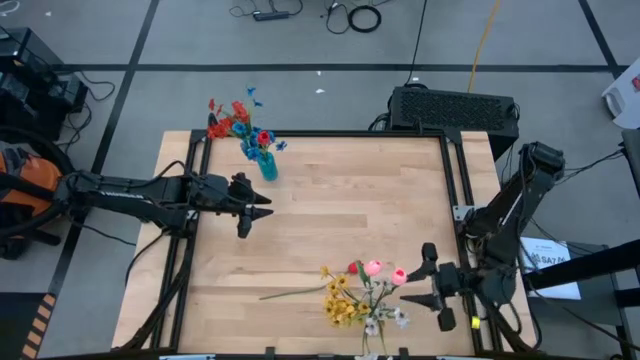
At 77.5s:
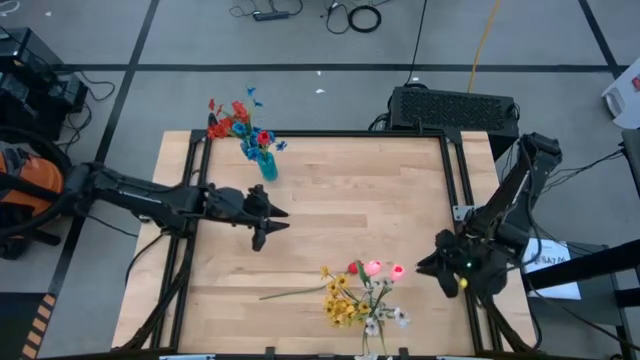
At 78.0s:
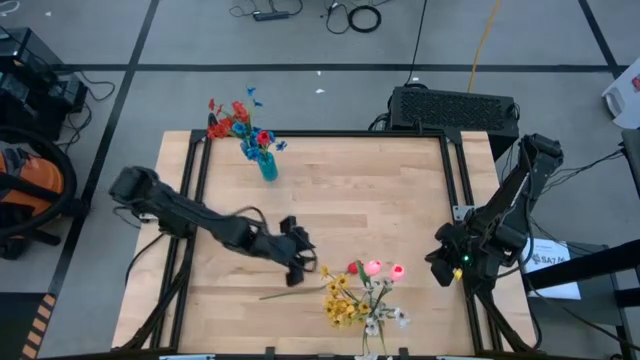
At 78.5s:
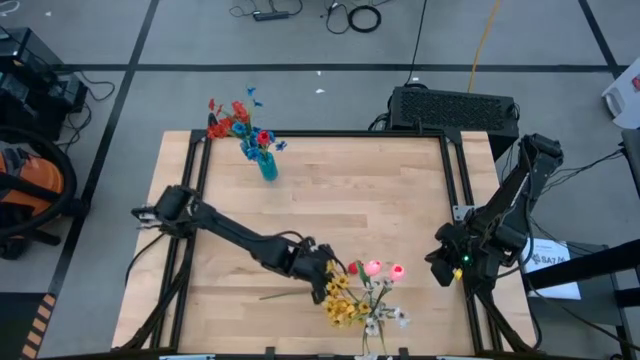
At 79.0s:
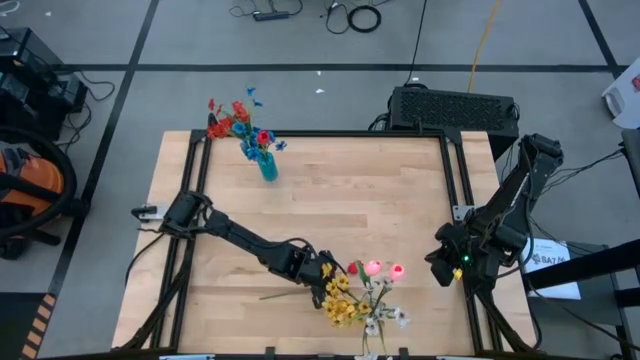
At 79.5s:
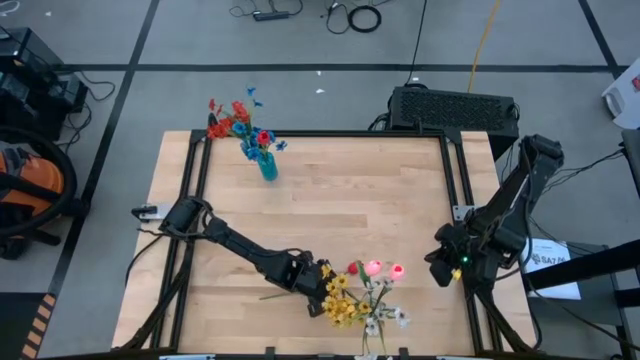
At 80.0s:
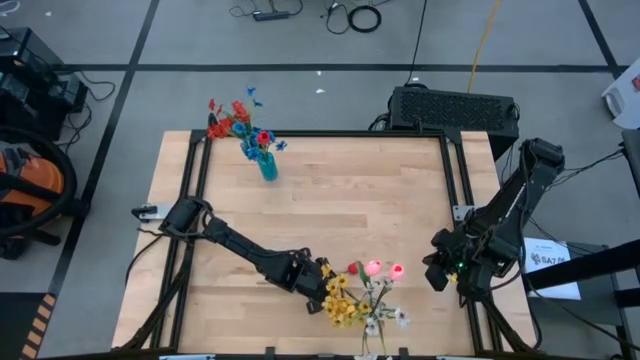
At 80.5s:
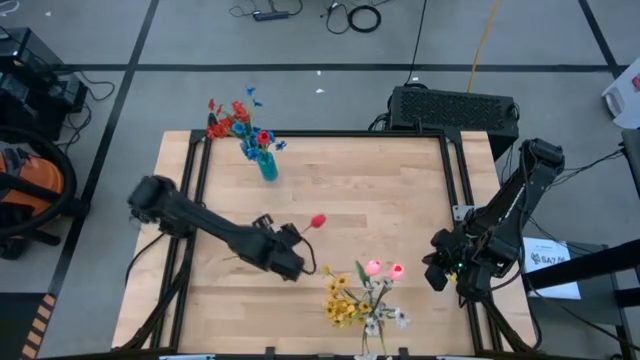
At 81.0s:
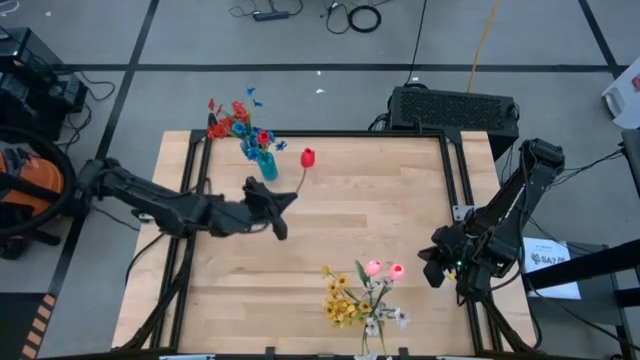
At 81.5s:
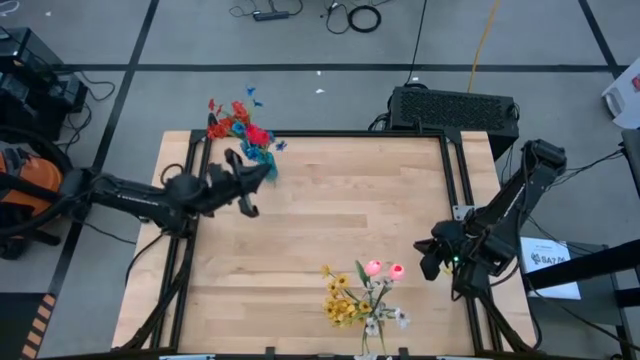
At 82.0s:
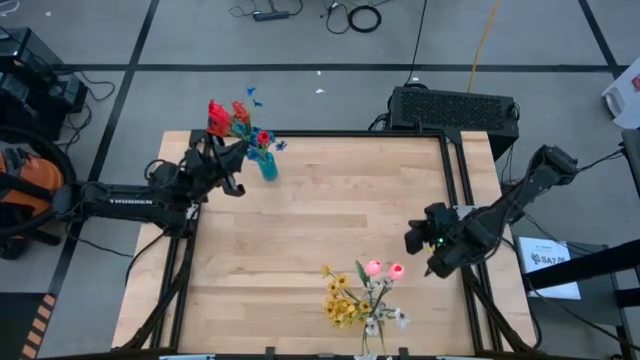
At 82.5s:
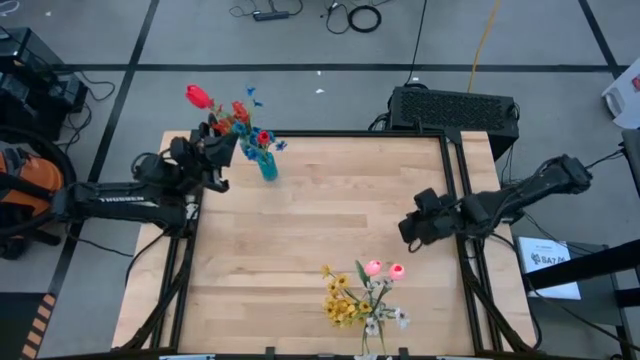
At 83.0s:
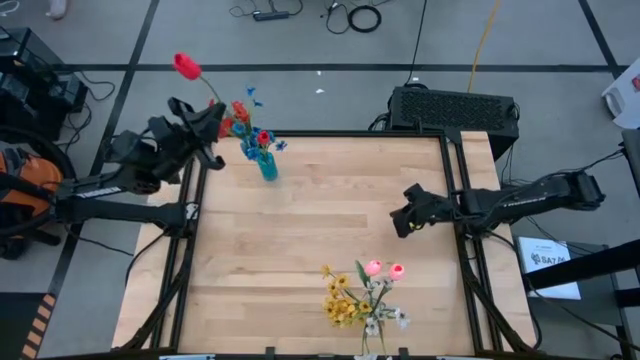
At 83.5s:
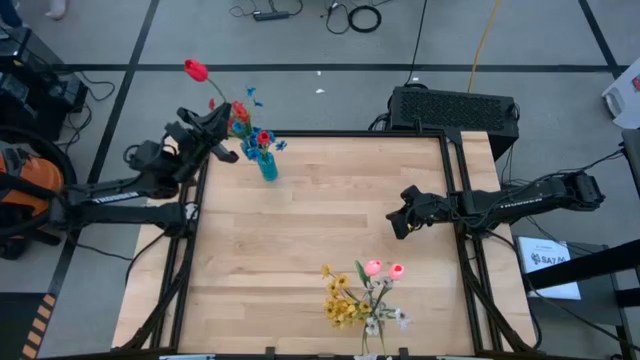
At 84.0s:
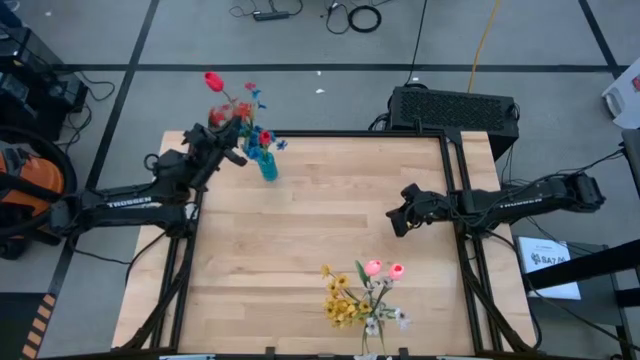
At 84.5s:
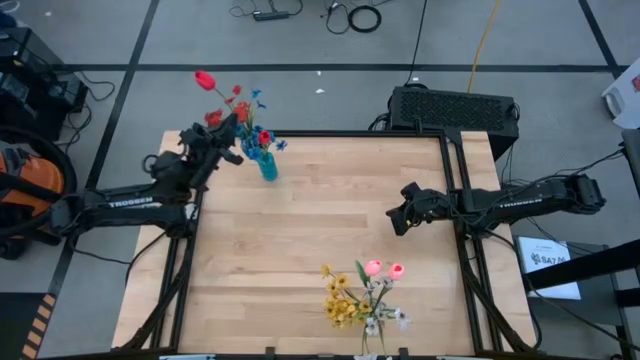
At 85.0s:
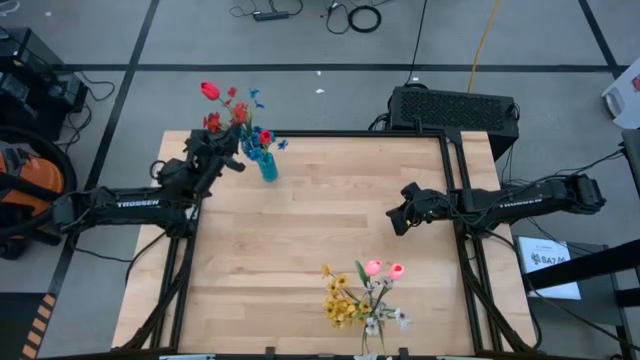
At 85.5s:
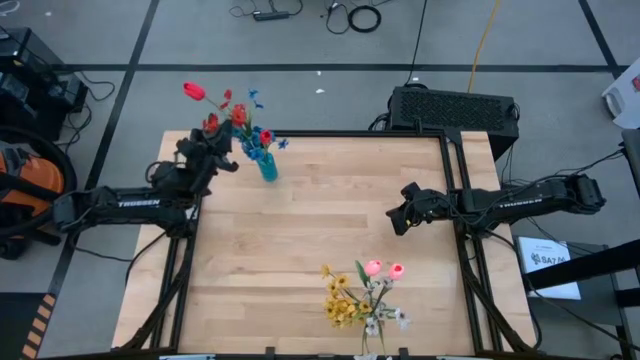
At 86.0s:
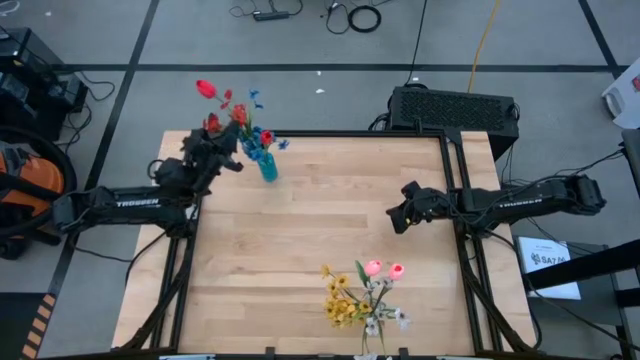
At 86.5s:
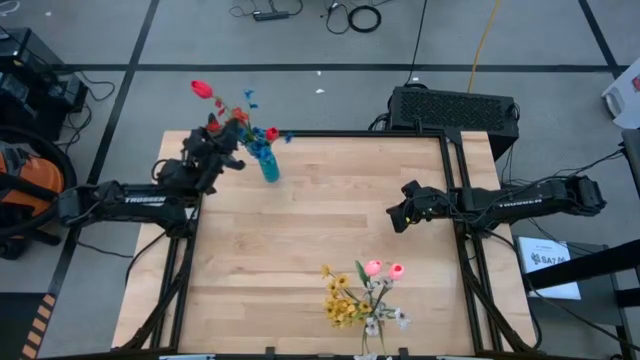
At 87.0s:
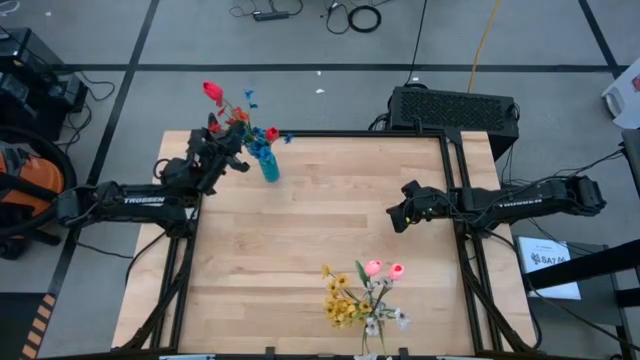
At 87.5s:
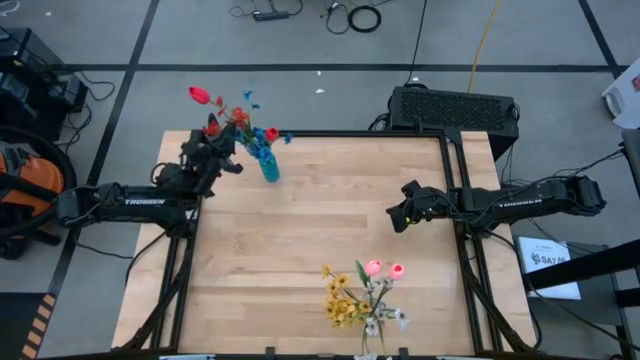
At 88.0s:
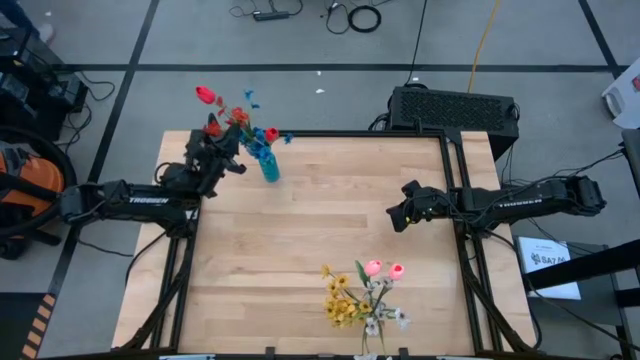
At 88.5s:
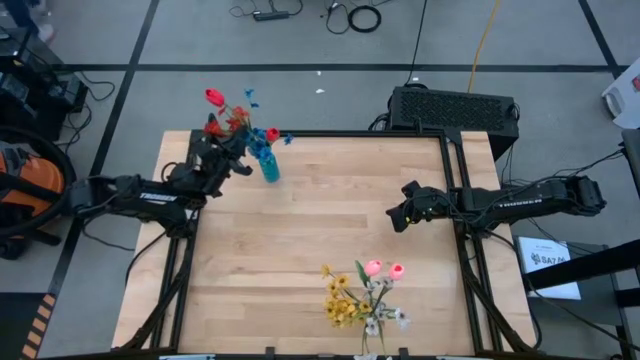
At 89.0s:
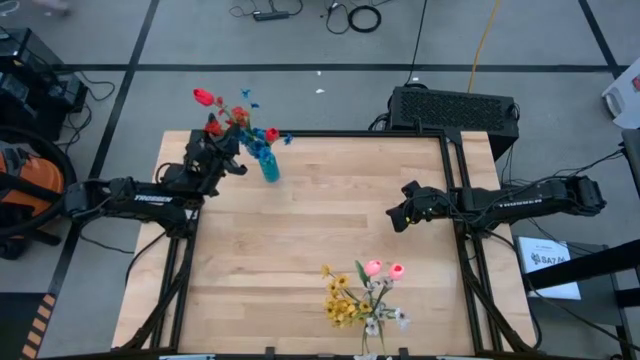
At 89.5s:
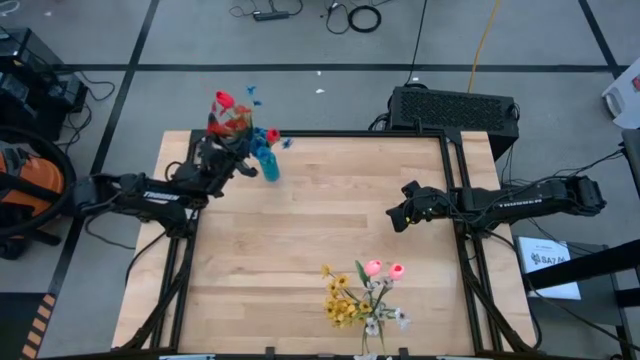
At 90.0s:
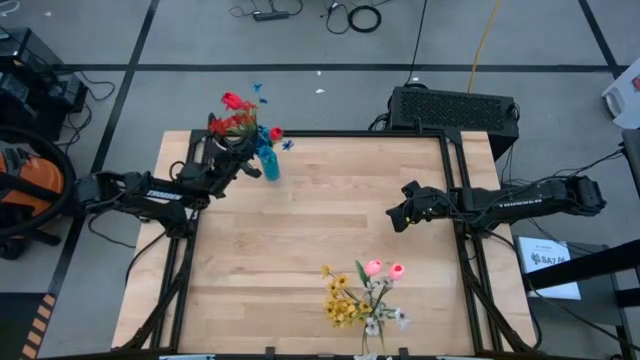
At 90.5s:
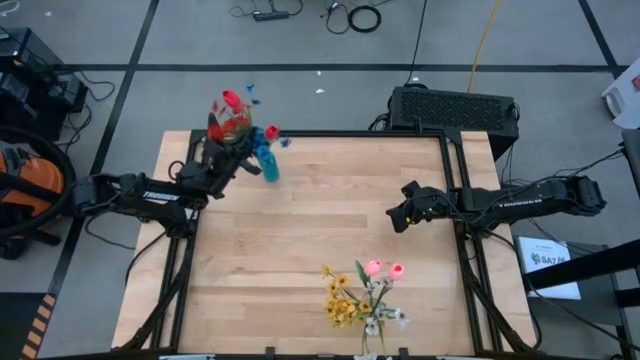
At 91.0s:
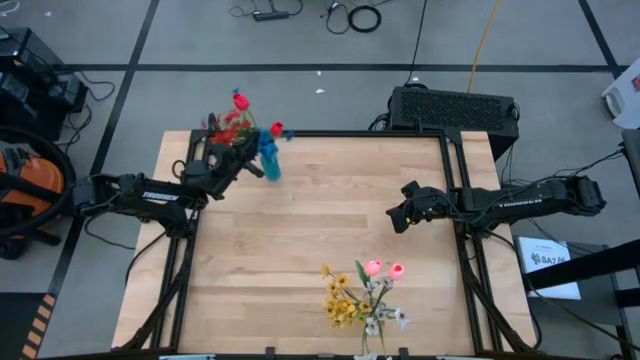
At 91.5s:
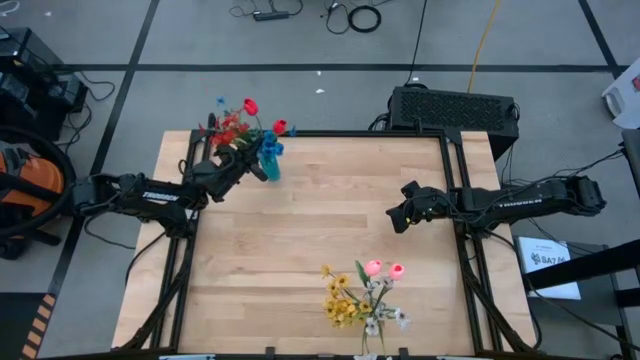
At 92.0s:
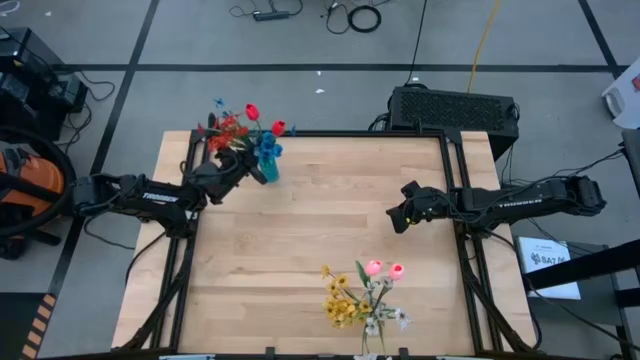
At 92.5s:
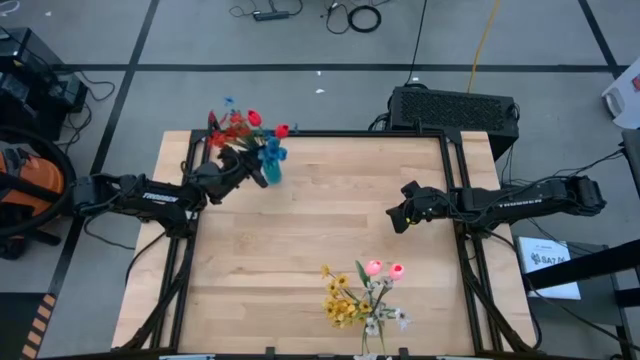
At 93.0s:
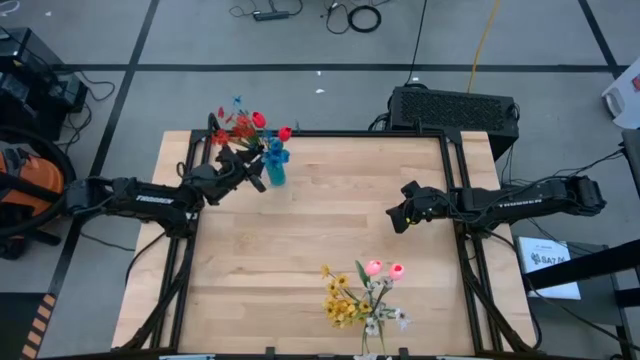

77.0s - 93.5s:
Task: Sort flowers into vase by color
Put the red flower into the blue vase

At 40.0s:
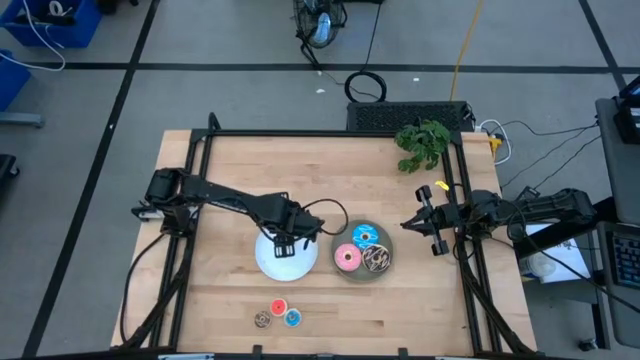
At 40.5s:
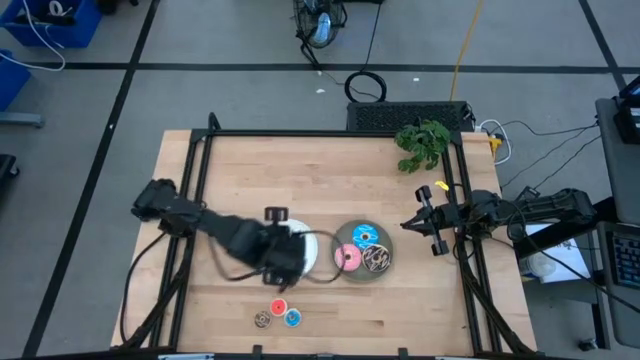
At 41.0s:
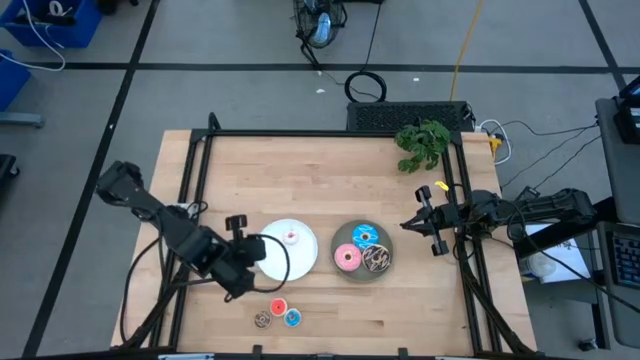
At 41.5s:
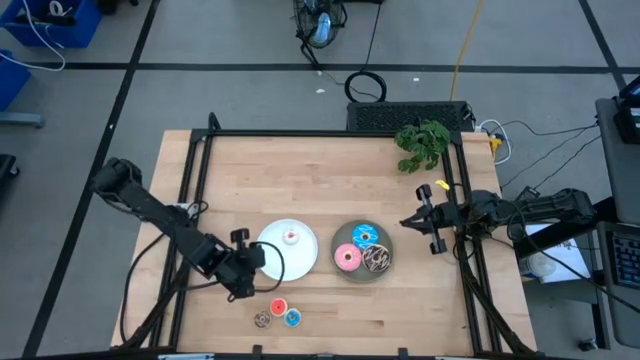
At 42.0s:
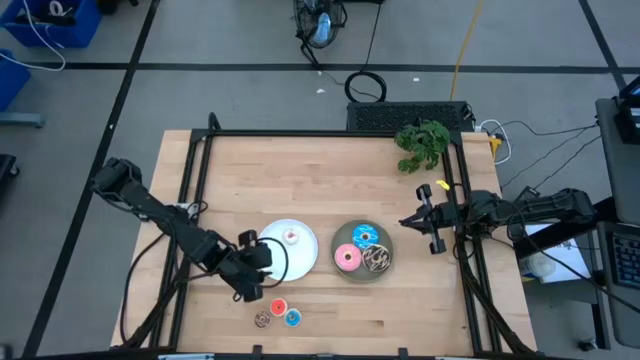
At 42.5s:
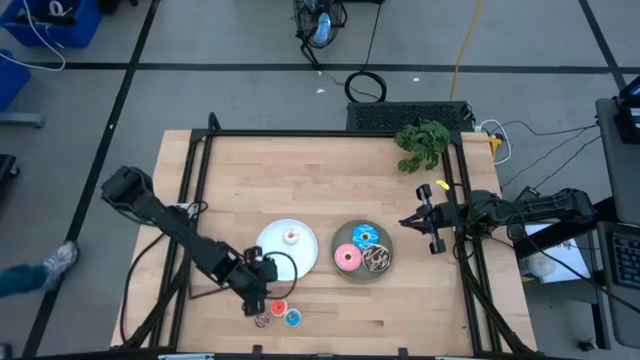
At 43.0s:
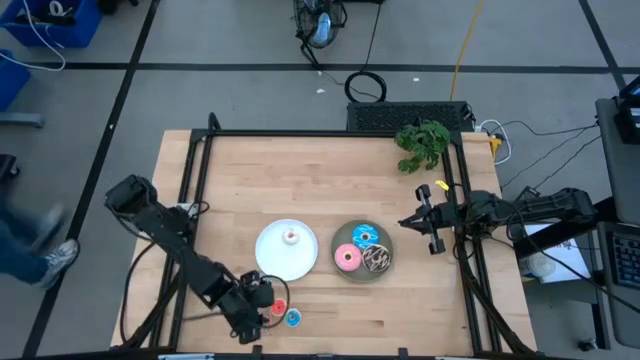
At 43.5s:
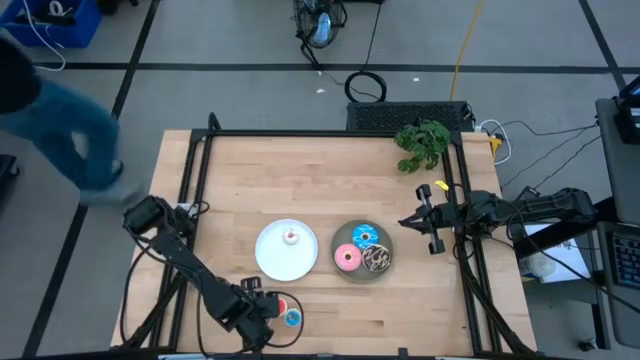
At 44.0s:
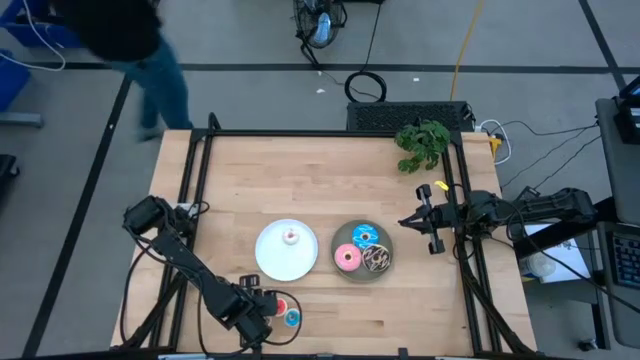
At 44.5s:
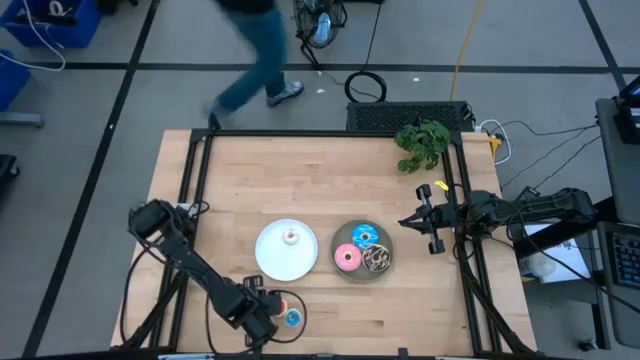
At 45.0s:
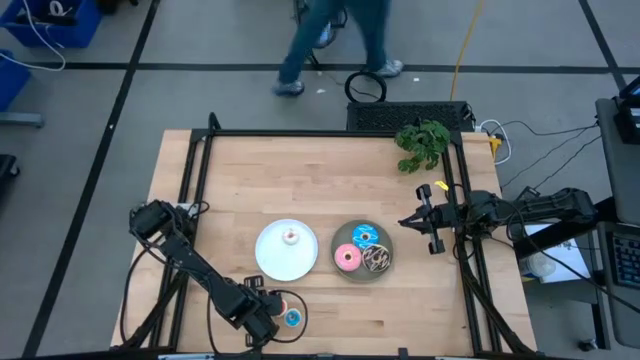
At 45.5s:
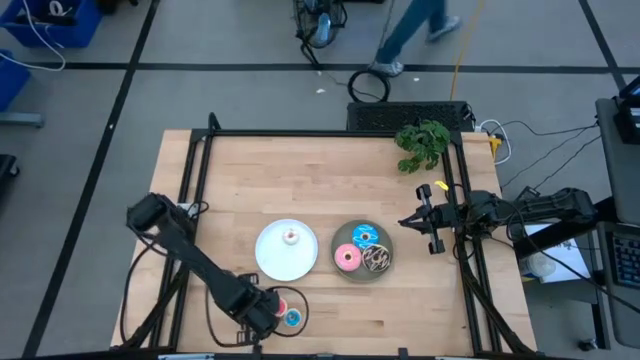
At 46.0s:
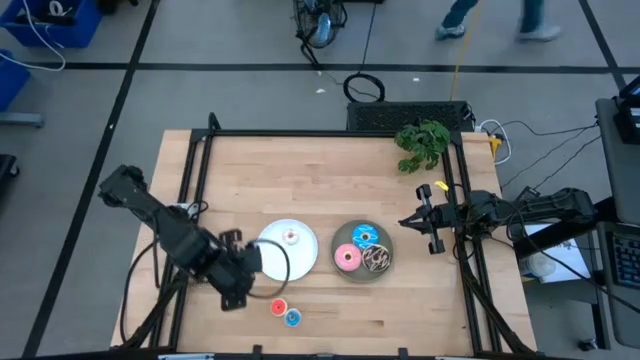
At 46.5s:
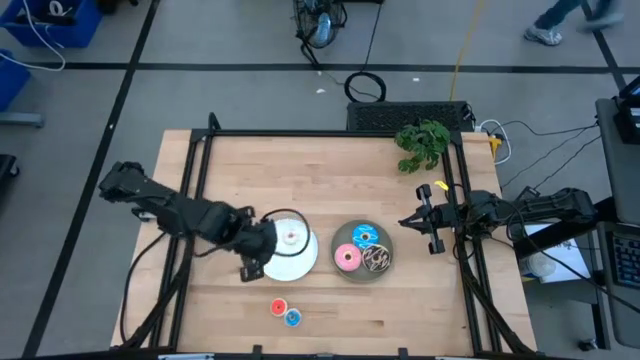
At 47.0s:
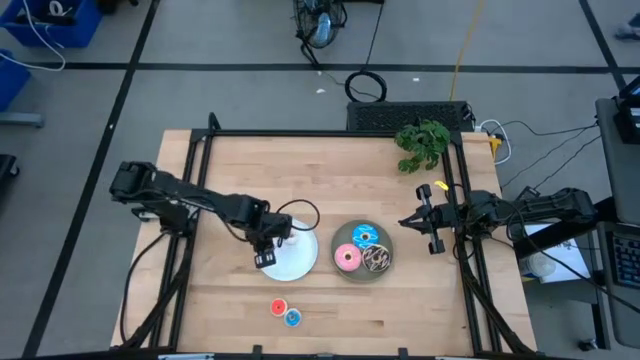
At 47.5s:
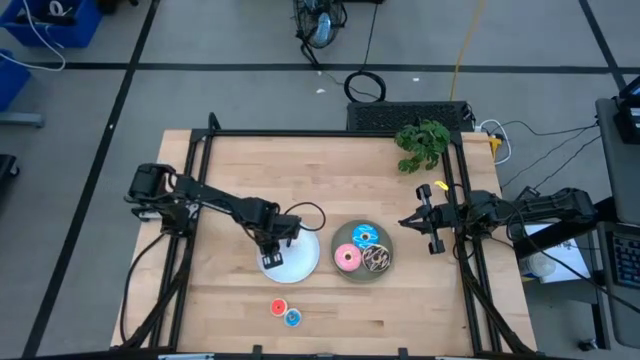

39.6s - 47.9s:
Task: Pick & Place donuts
Put the small brown donut on the white plate
